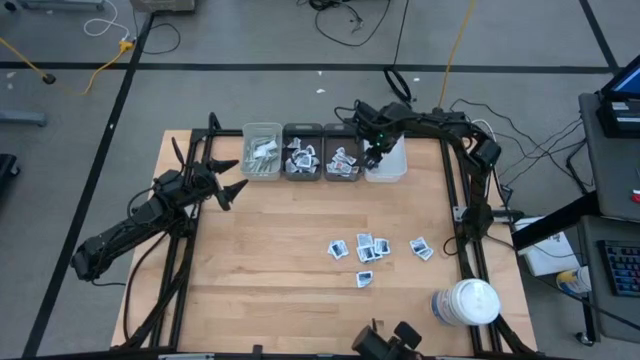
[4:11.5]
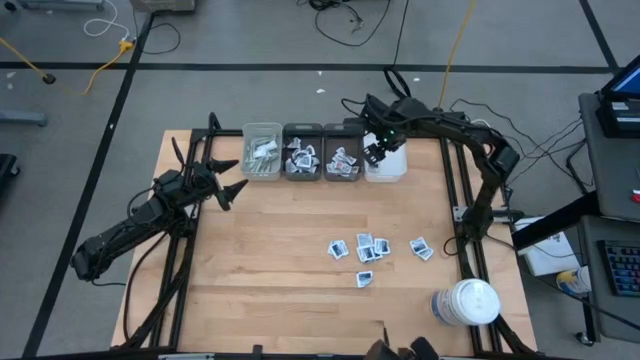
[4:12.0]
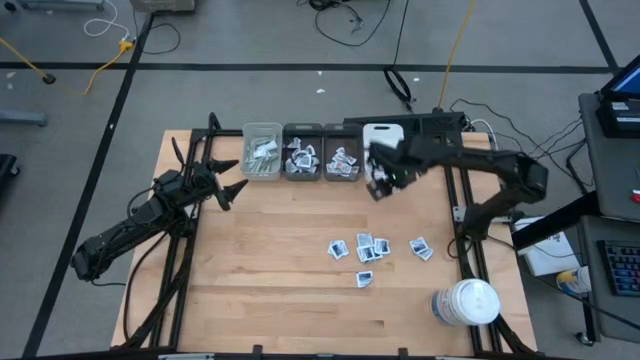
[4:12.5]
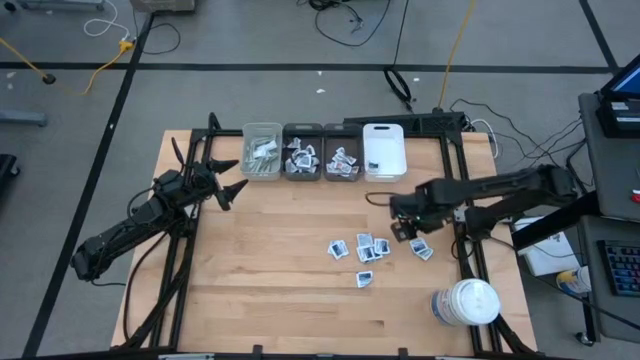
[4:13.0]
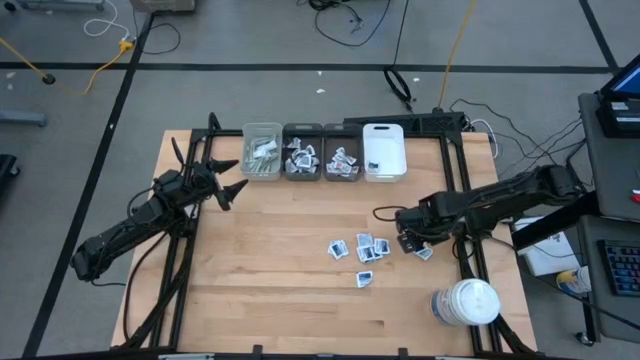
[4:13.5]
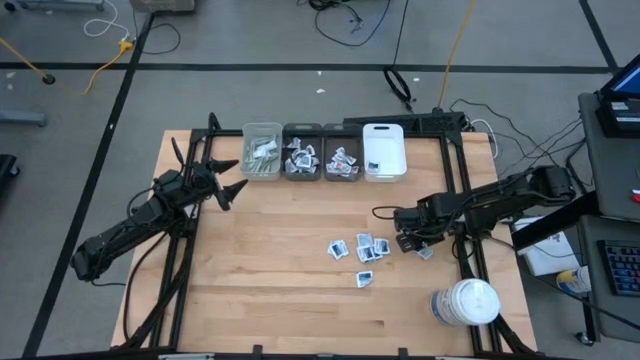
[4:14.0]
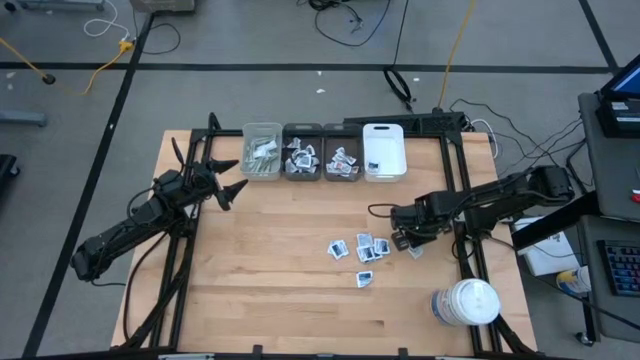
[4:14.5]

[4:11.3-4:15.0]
Task: Pick & Place First Aid Supplies
Put the alcohol pad into the white bin

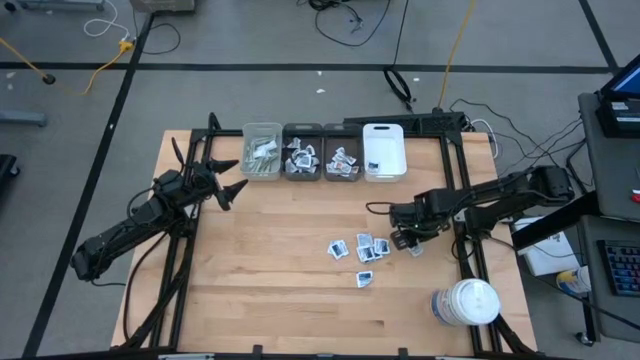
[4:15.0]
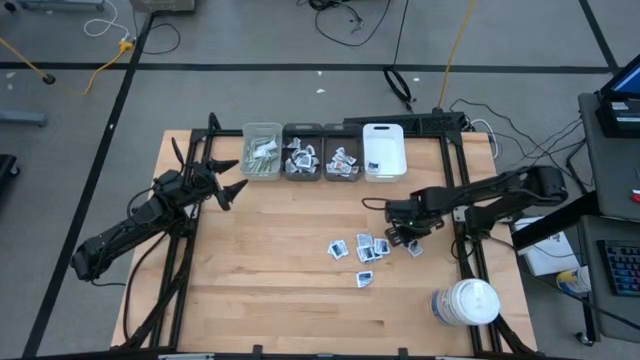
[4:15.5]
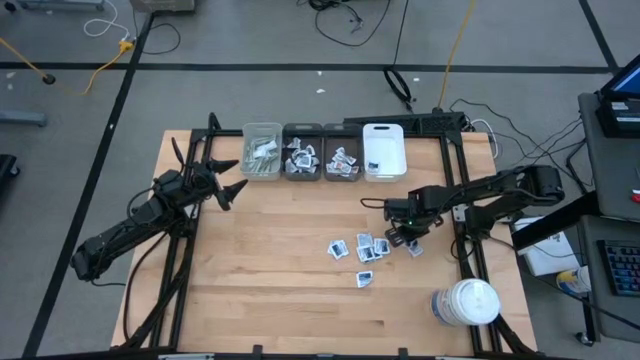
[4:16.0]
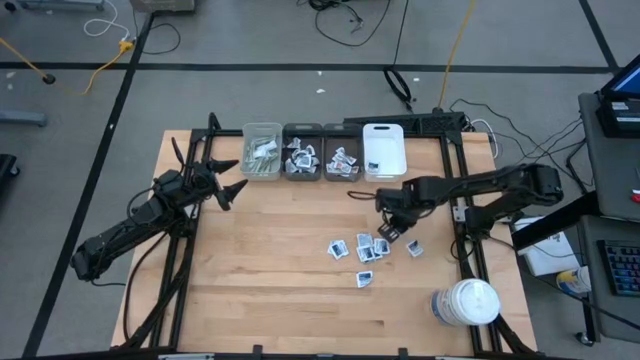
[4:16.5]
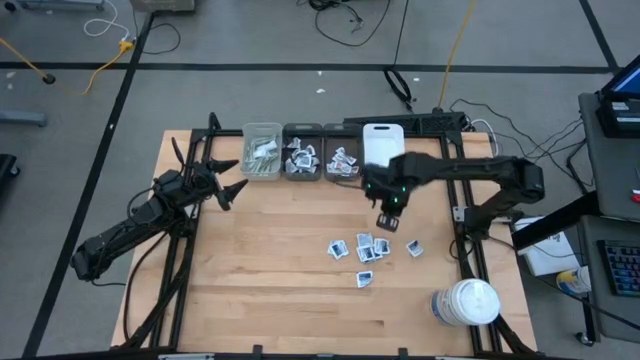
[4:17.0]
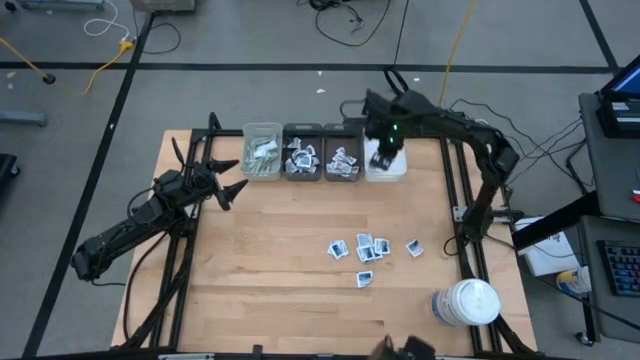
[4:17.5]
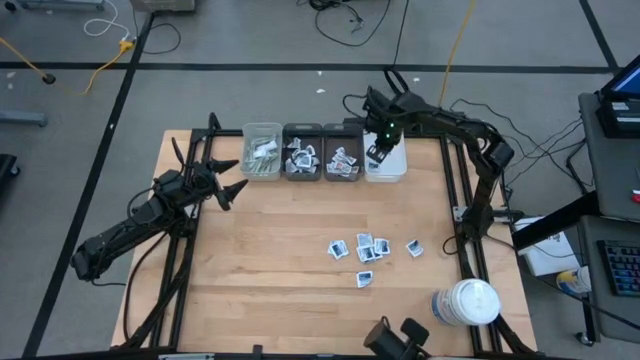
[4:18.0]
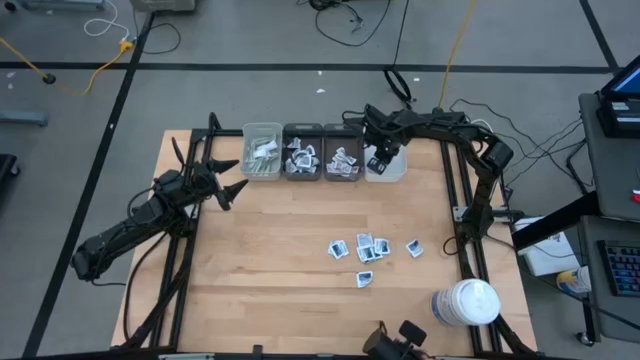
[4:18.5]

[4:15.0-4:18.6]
Put the alcohol pad into the white bin

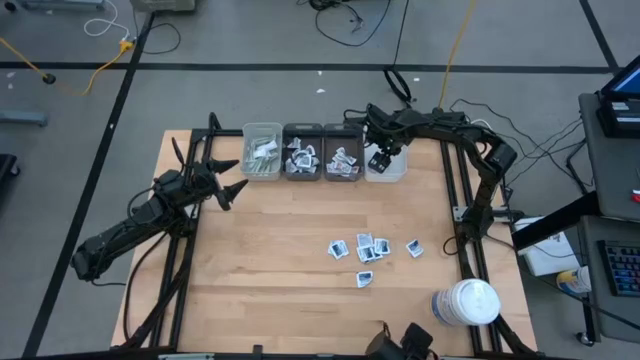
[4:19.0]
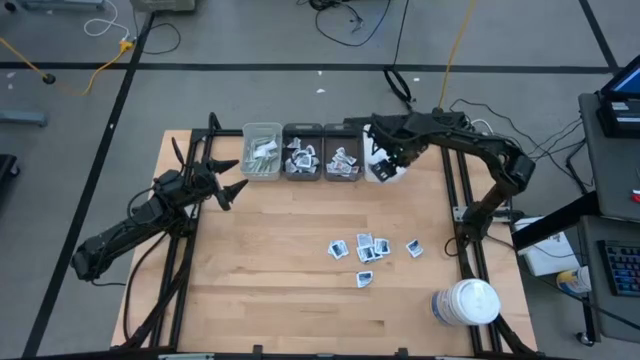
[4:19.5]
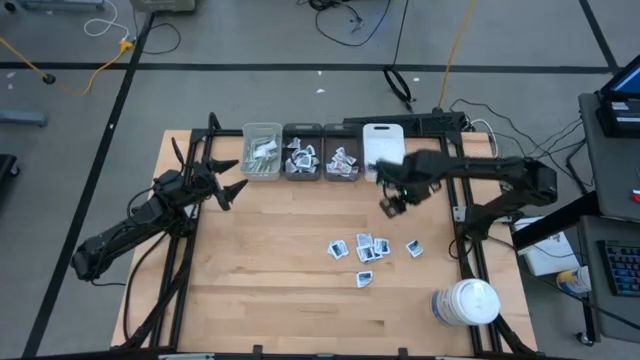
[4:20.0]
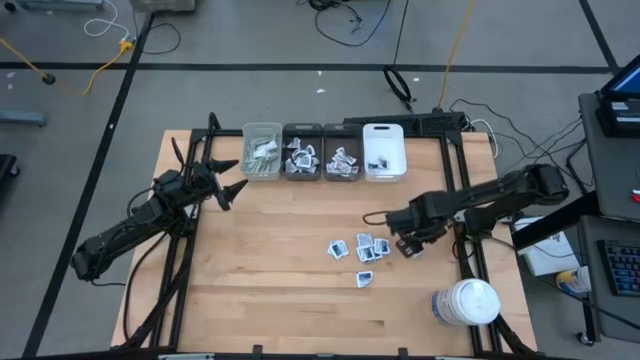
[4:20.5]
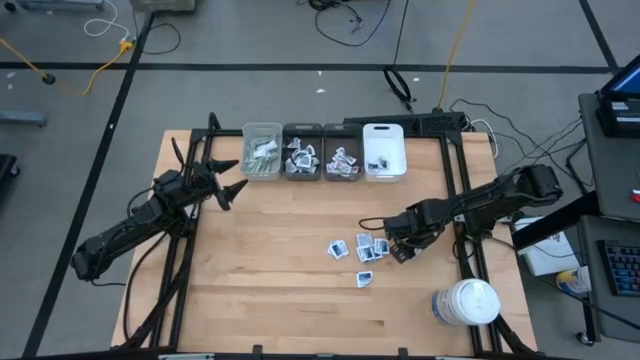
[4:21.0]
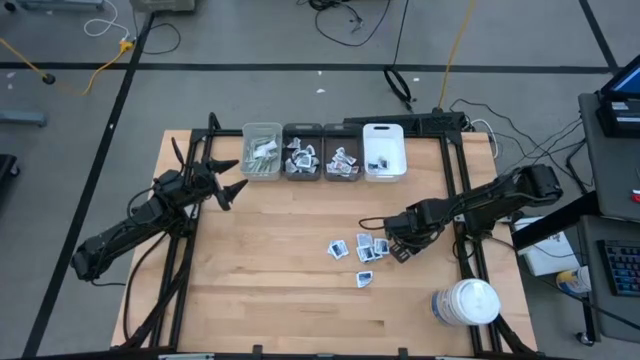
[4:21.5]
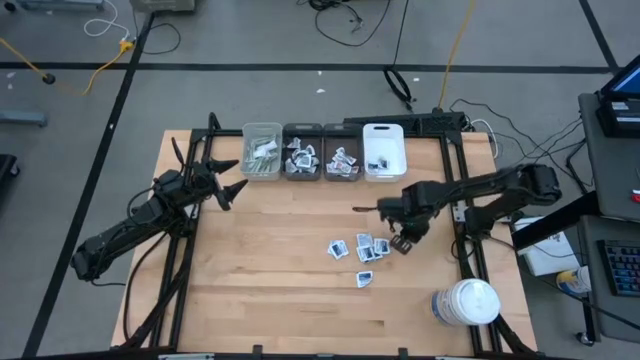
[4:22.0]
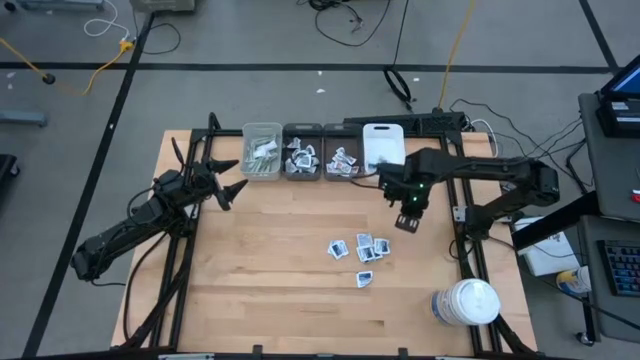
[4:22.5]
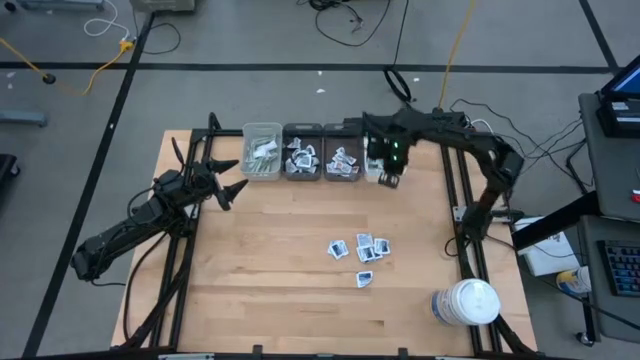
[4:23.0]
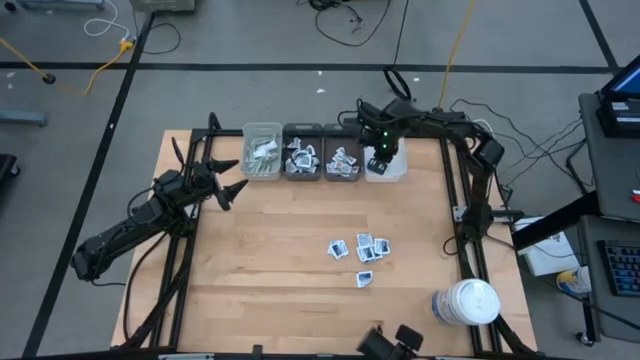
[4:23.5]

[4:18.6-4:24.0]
Put the alcohol pad into the white bin

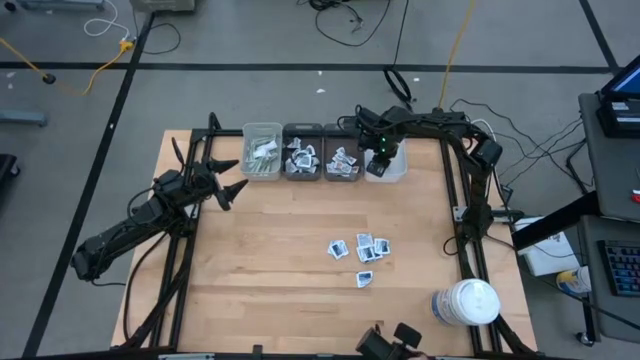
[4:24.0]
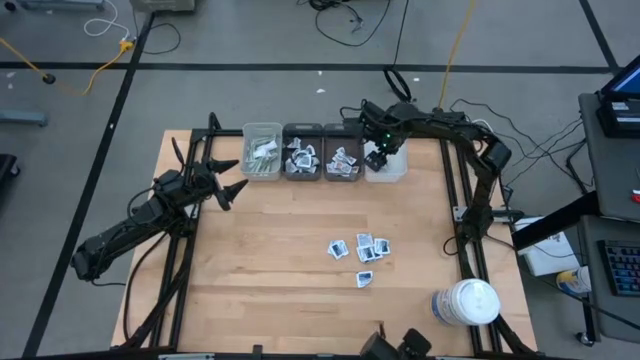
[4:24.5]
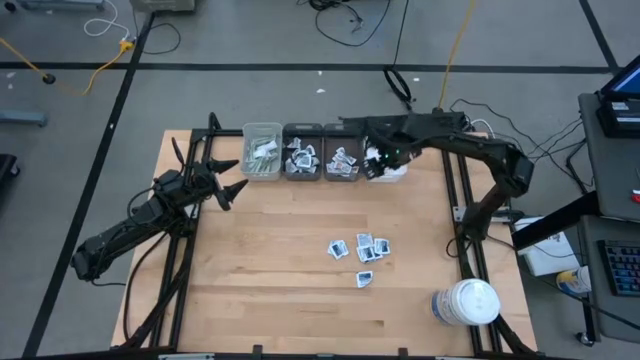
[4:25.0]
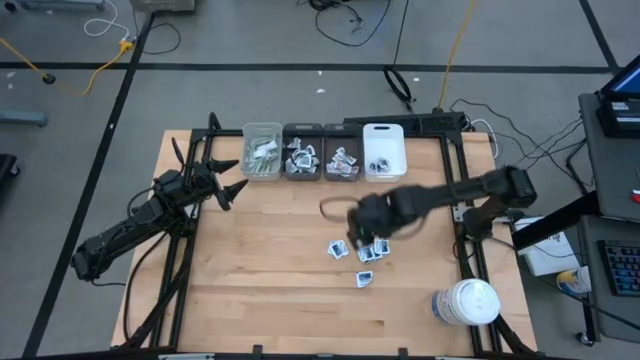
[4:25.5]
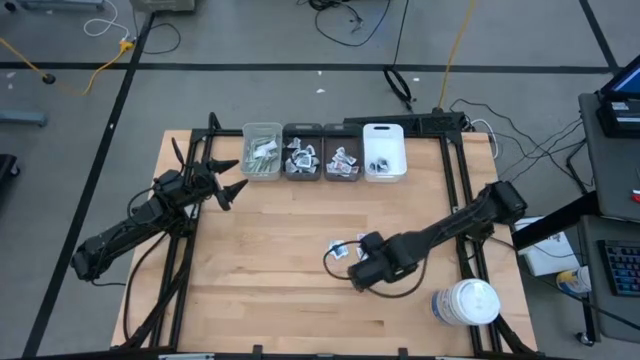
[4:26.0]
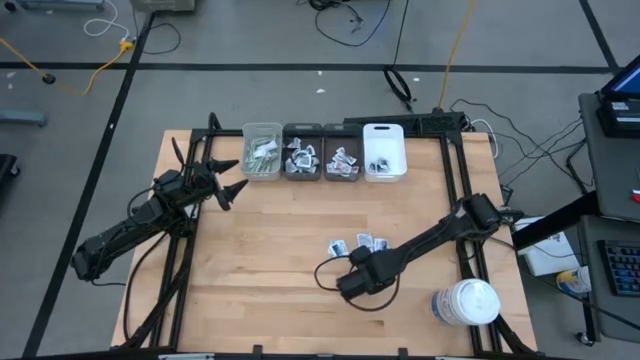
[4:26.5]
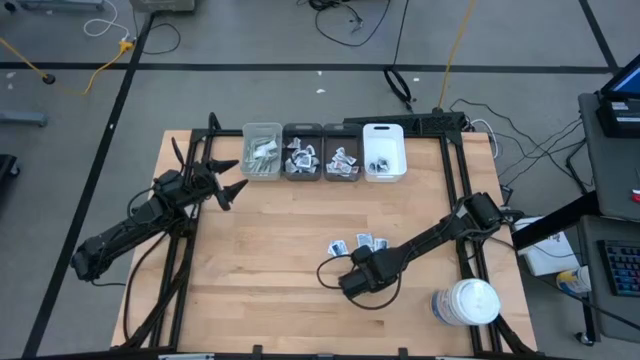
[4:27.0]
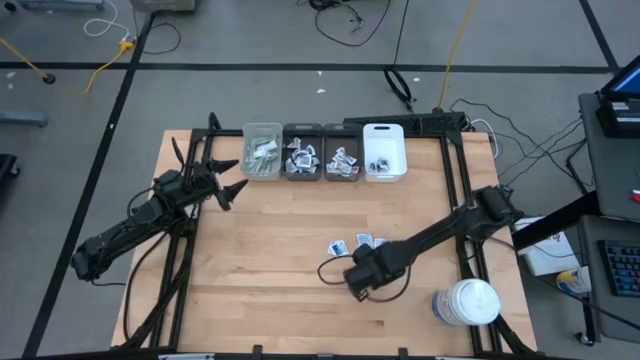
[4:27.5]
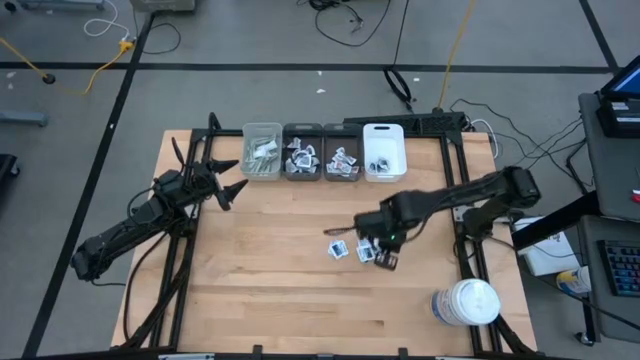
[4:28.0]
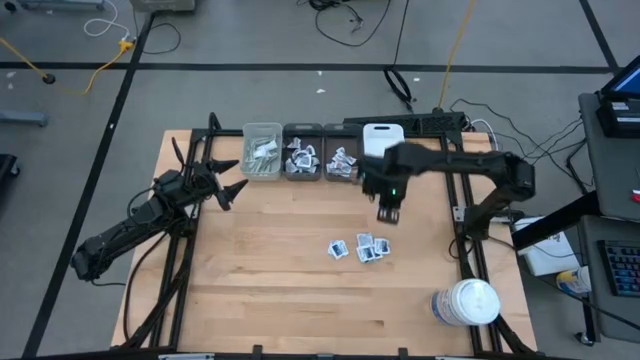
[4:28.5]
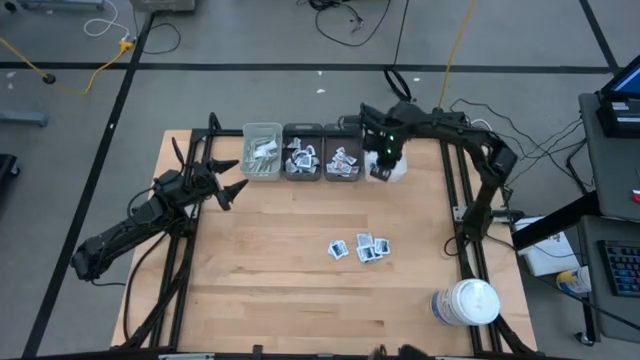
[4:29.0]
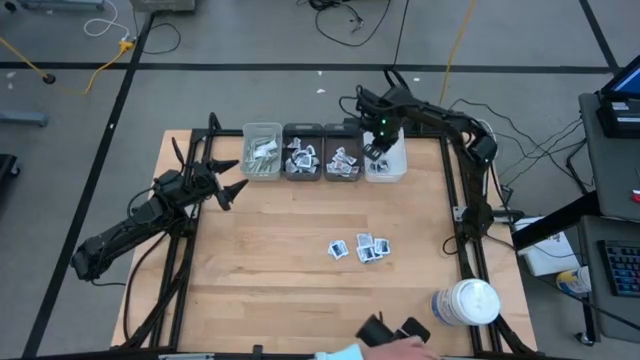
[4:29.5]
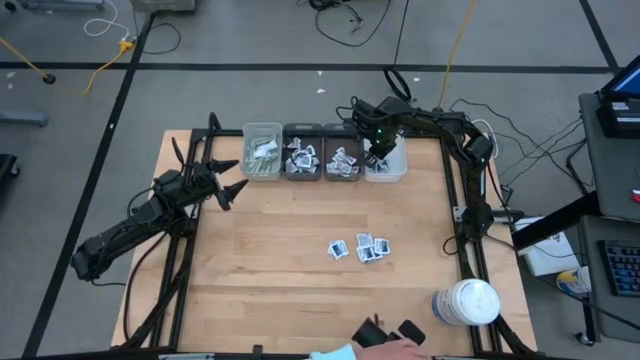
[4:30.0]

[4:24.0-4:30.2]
Put the alcohol pad into the white bin

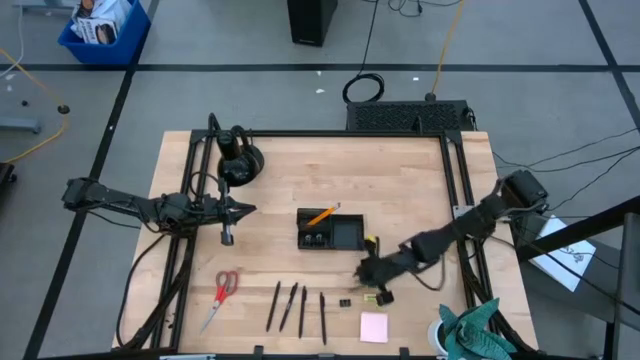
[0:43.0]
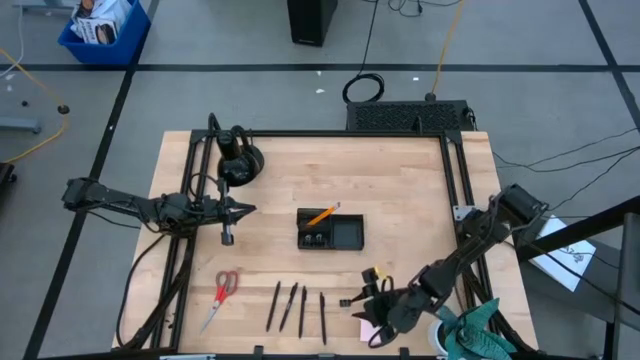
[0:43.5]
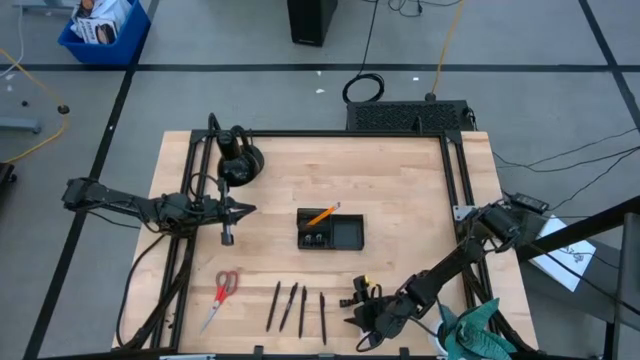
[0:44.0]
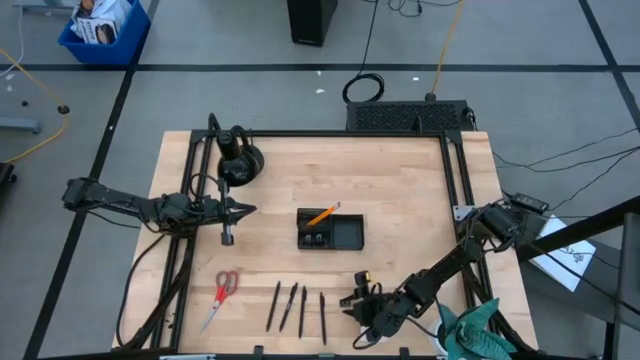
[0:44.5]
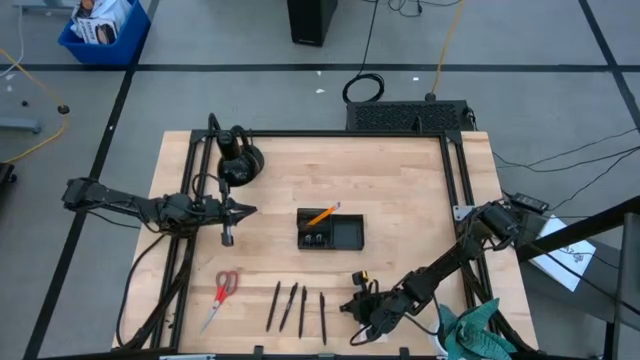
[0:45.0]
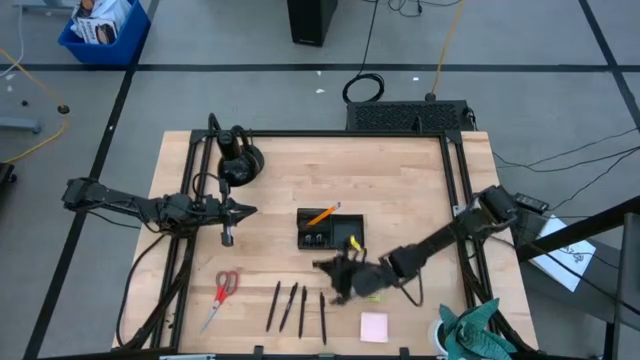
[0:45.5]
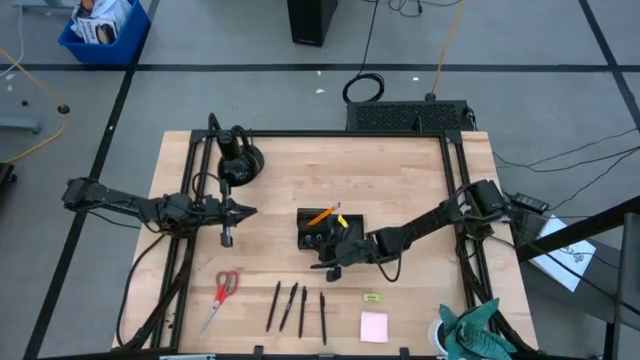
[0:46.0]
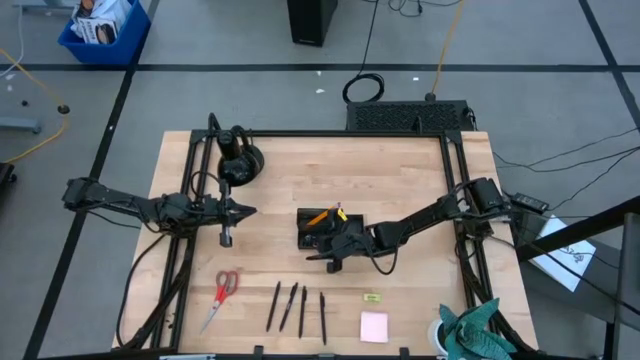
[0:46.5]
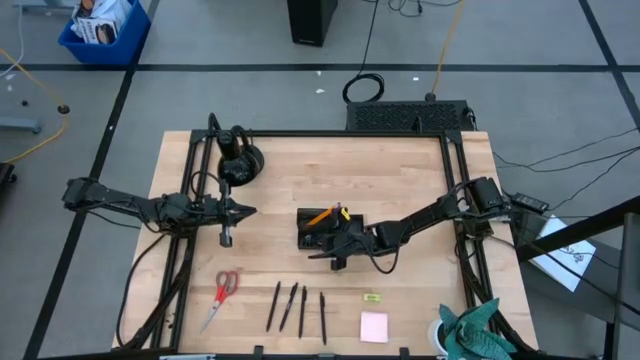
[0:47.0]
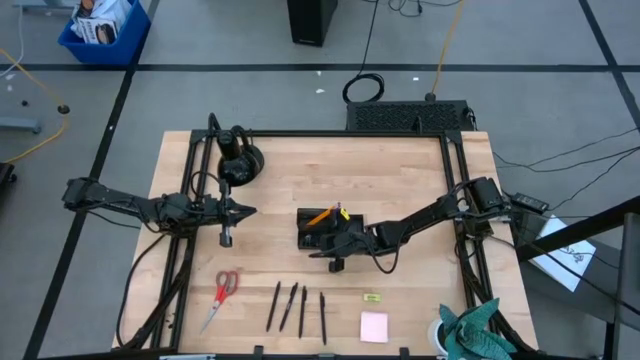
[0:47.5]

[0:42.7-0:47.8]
Task: Pick and place office supplies into organizer
Put the black binder clip into the black desk organizer
